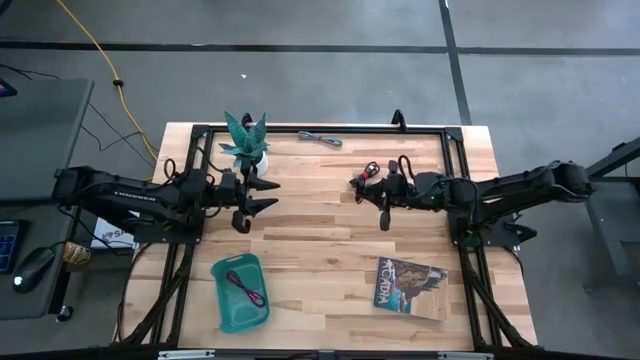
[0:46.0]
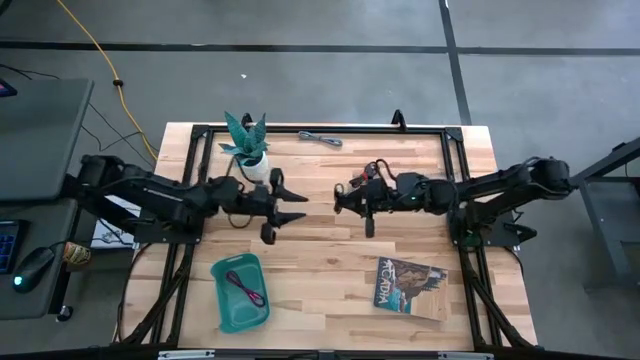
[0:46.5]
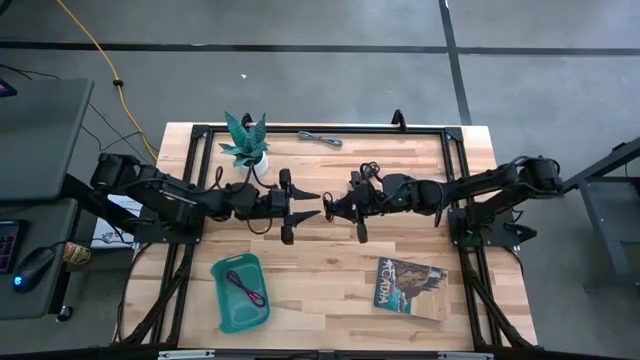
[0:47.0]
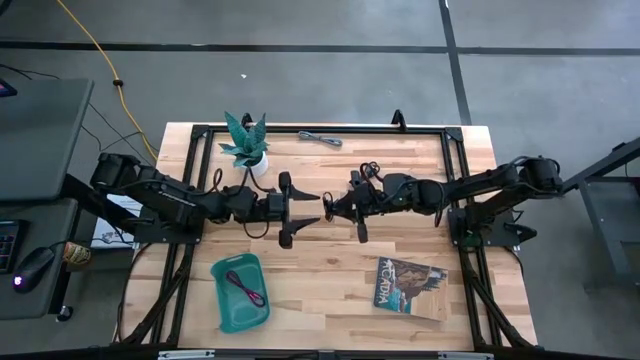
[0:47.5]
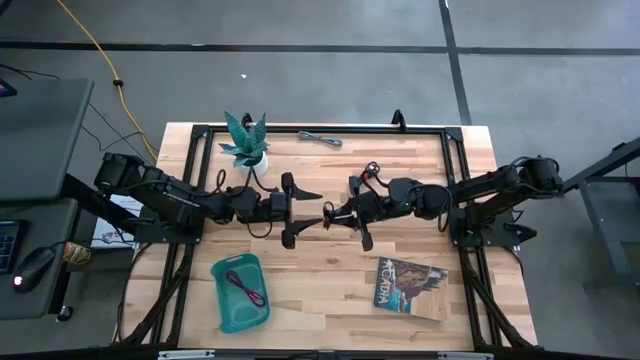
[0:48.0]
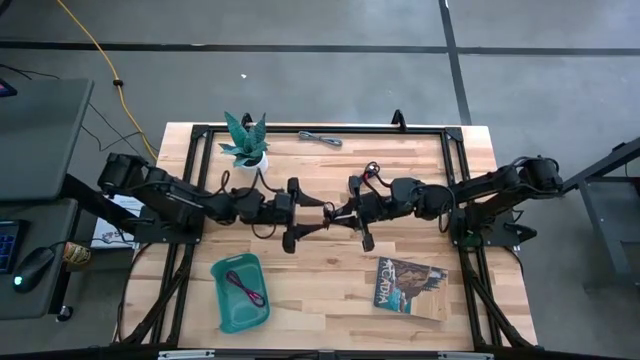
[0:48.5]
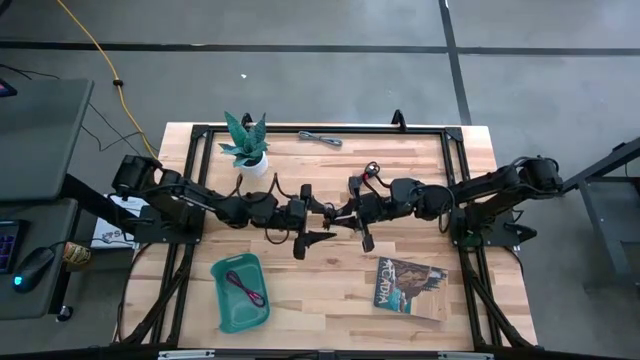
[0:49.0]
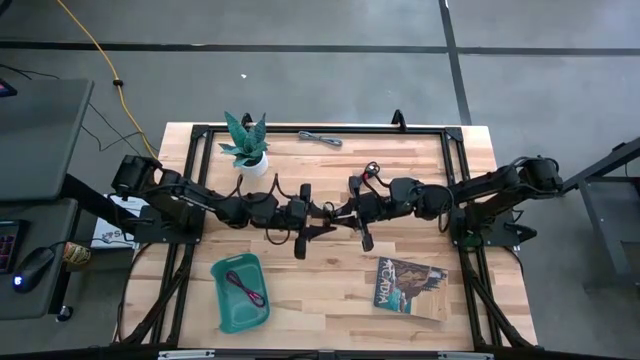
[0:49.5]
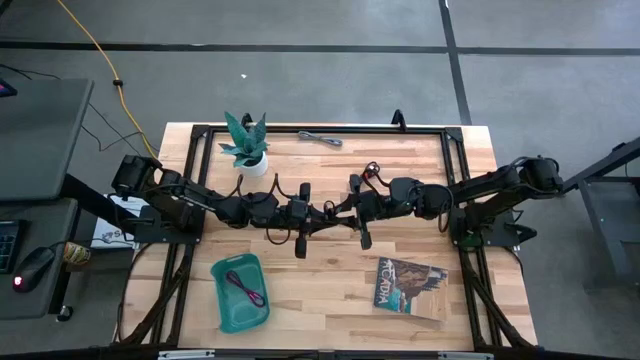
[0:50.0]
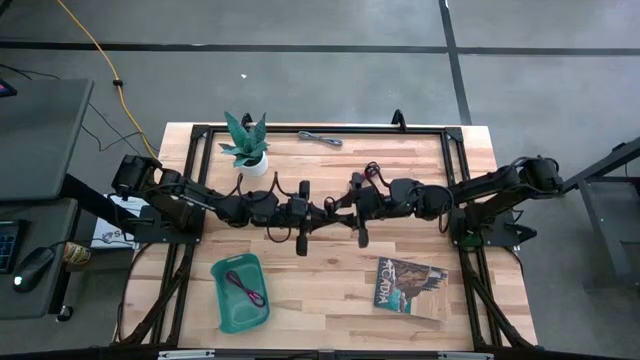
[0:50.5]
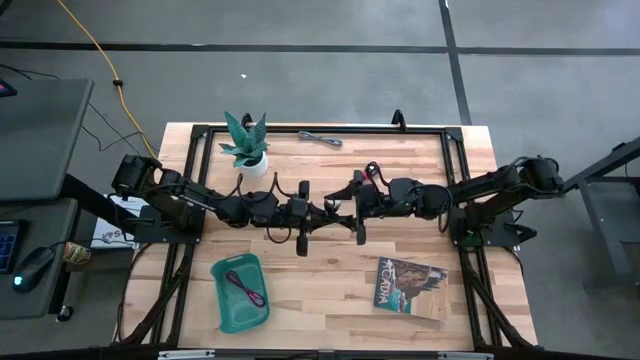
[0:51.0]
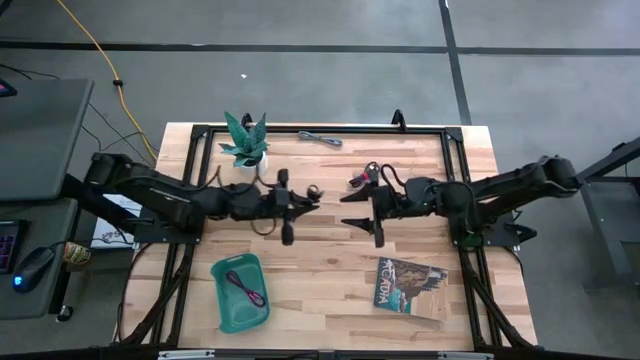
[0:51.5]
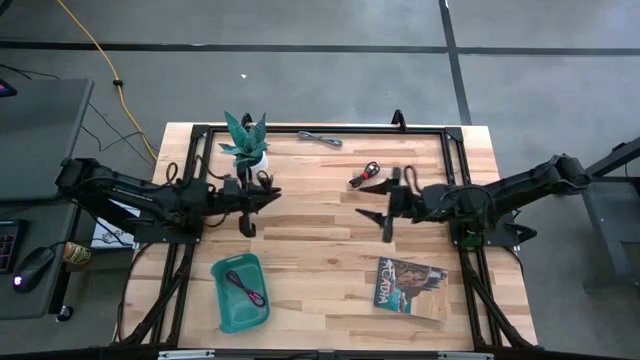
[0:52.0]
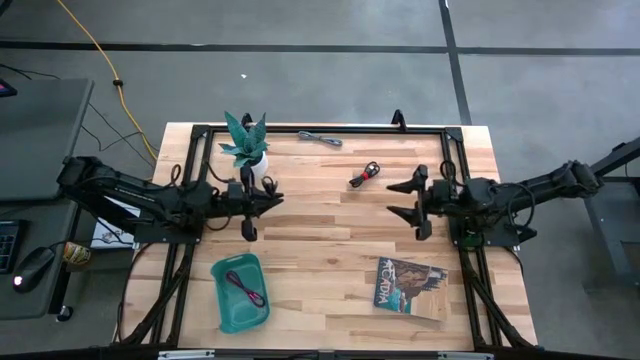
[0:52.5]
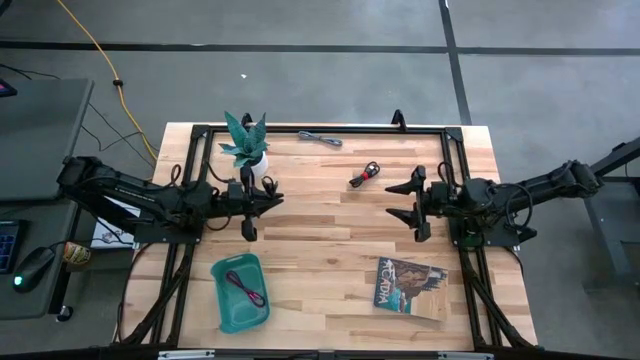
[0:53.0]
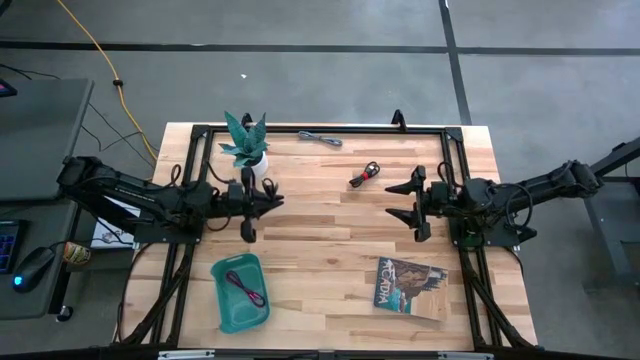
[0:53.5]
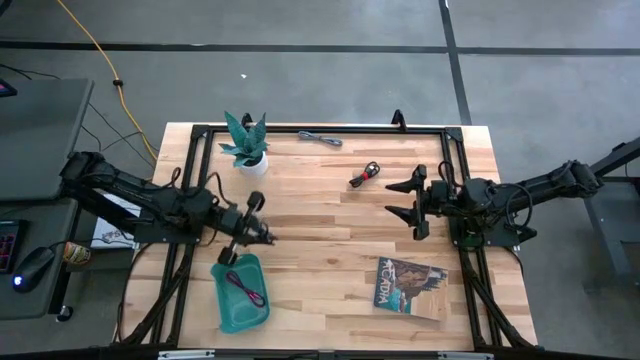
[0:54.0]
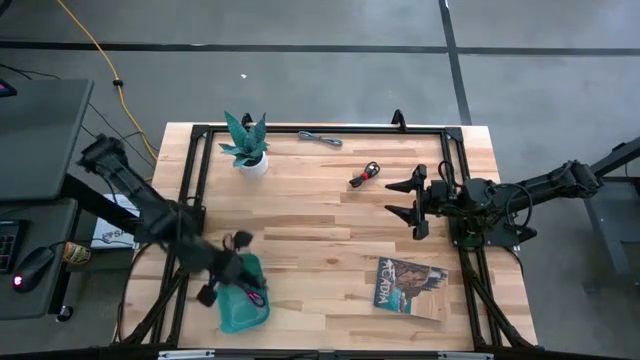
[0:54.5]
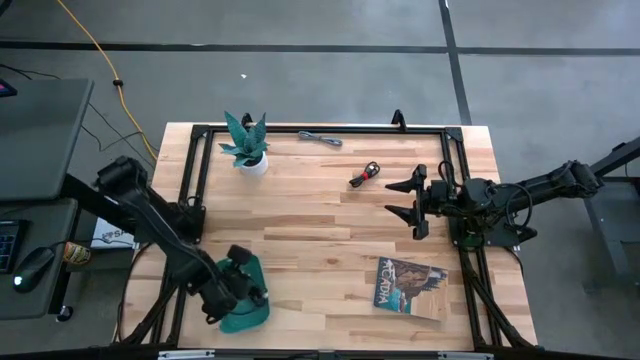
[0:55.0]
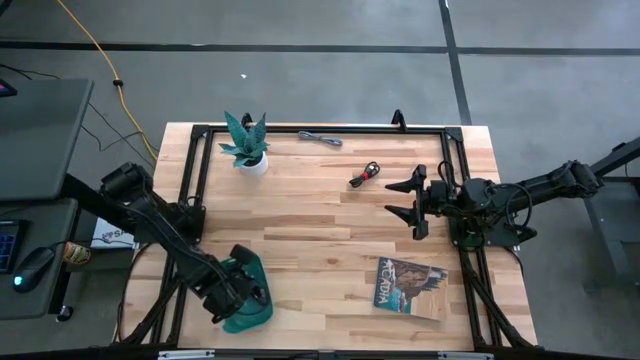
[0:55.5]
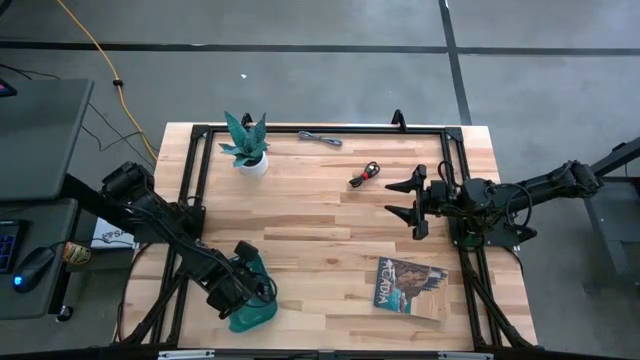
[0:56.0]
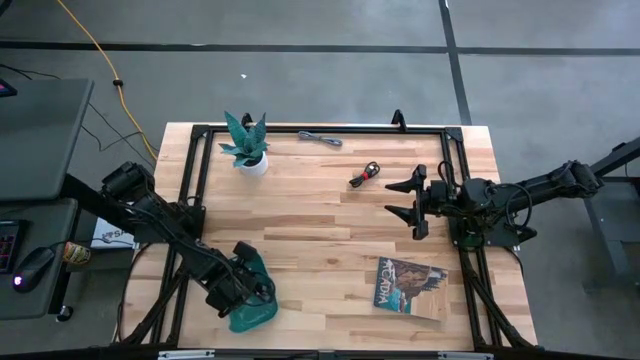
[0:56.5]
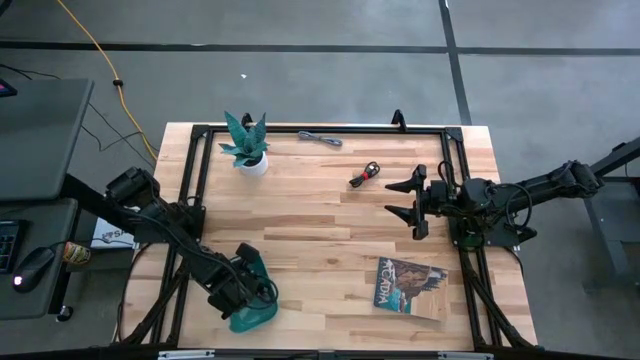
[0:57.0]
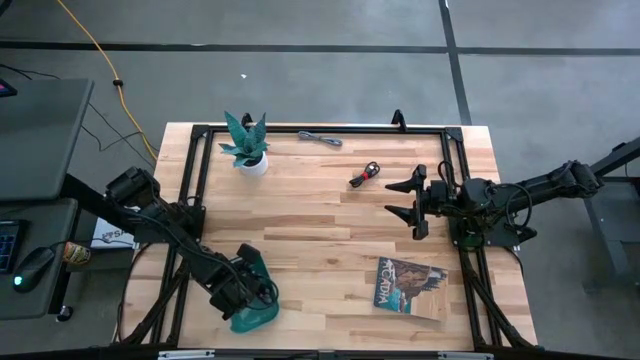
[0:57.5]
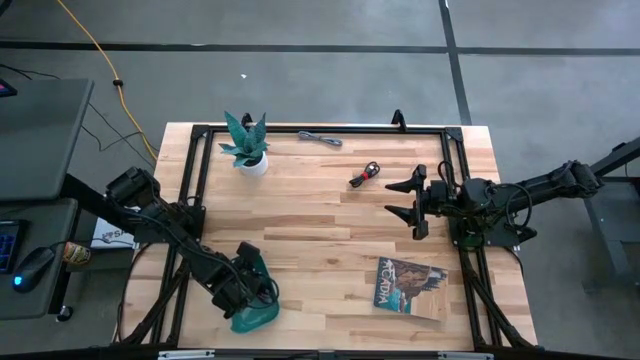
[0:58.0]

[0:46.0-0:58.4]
Task: Pick and place USB-C Cables
Put the right black USB cable into the green bin

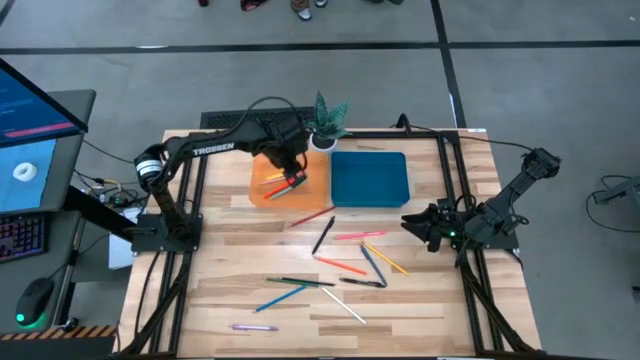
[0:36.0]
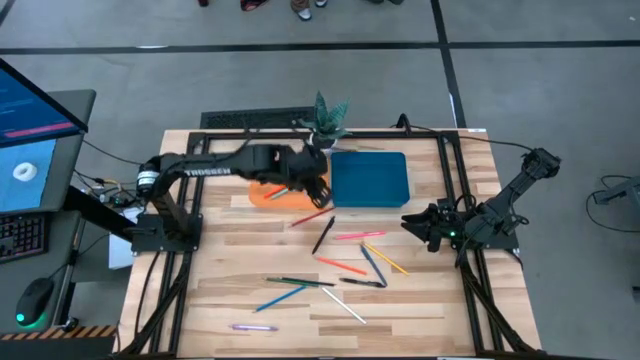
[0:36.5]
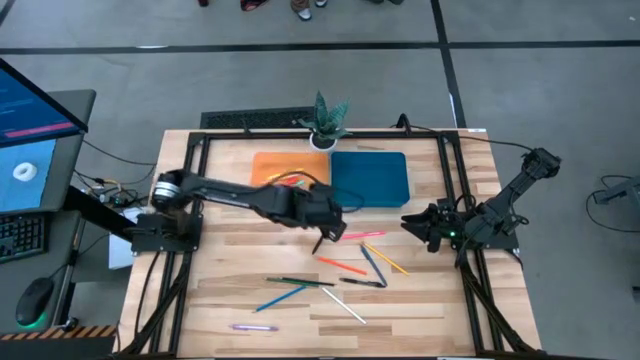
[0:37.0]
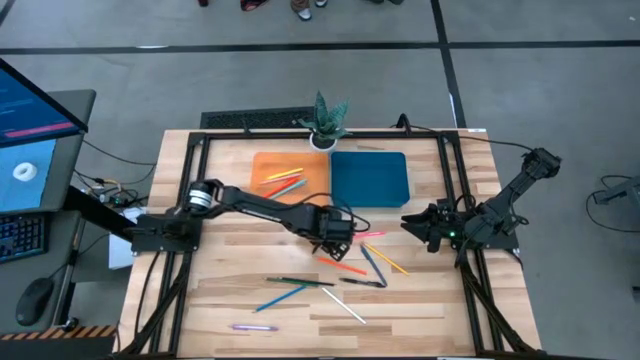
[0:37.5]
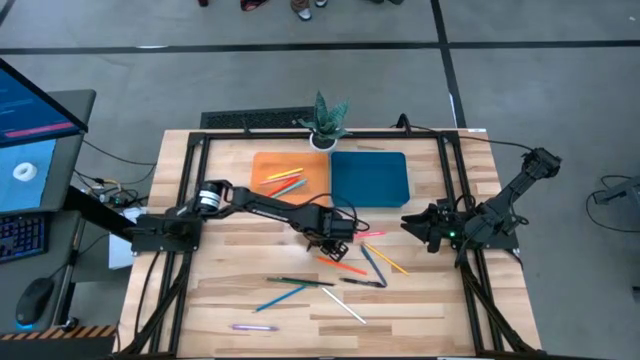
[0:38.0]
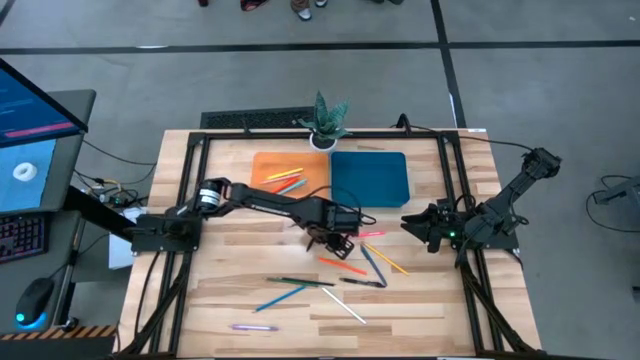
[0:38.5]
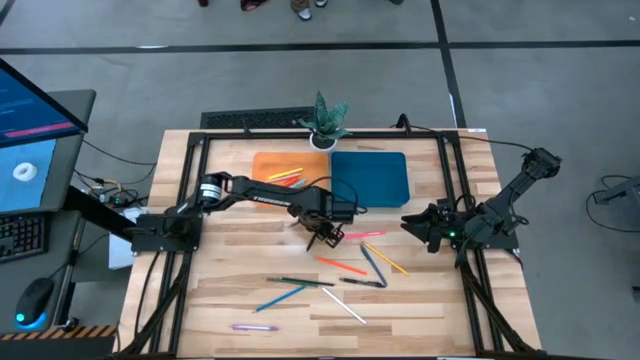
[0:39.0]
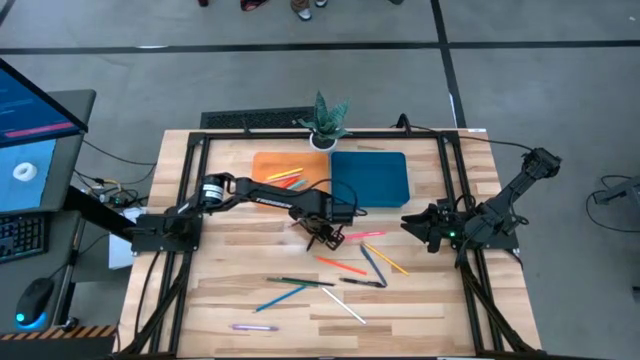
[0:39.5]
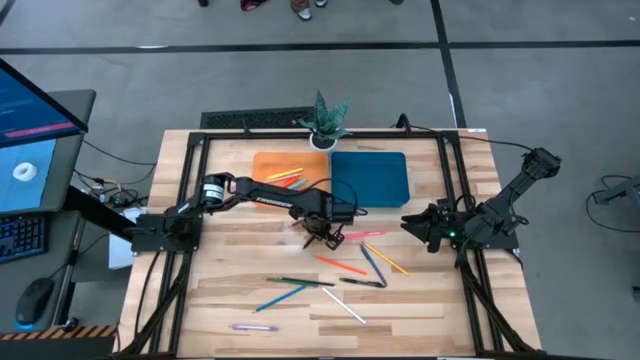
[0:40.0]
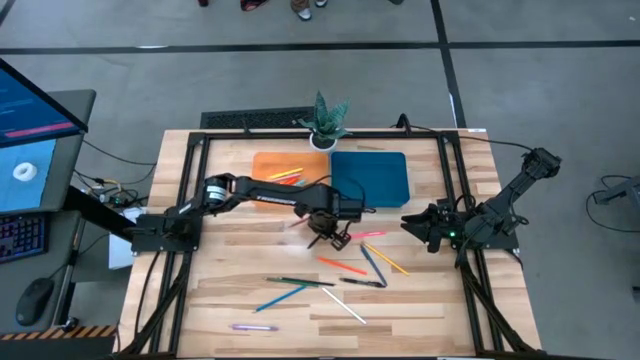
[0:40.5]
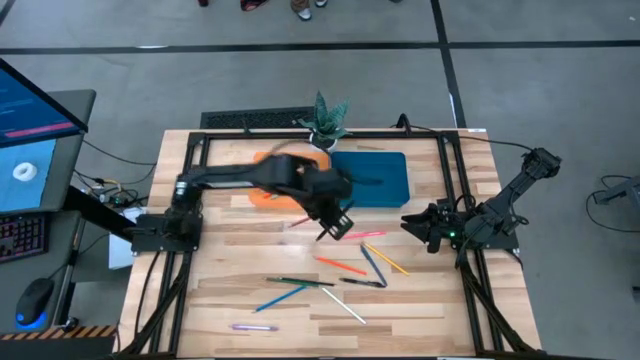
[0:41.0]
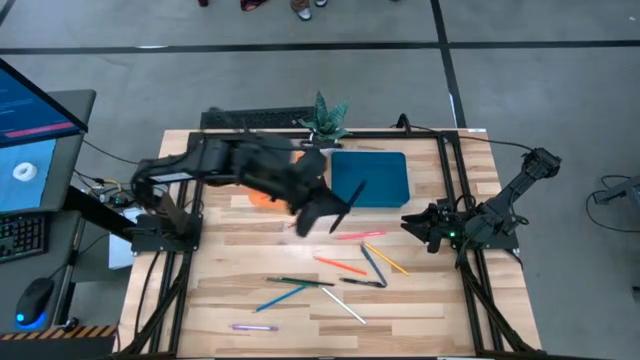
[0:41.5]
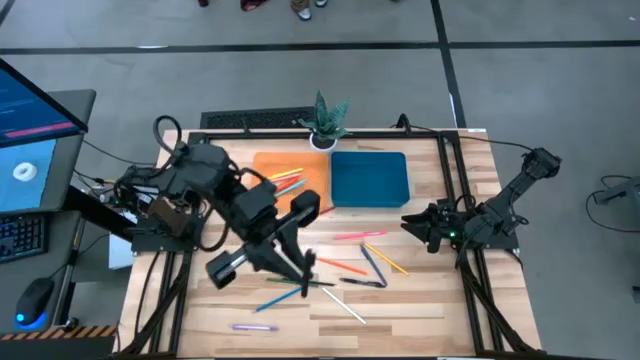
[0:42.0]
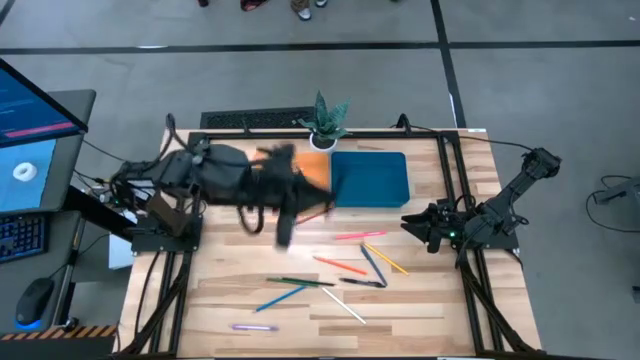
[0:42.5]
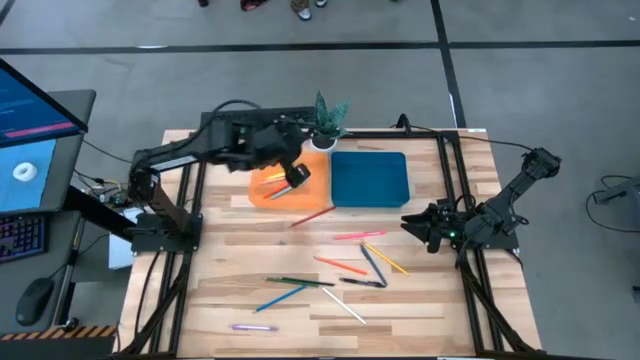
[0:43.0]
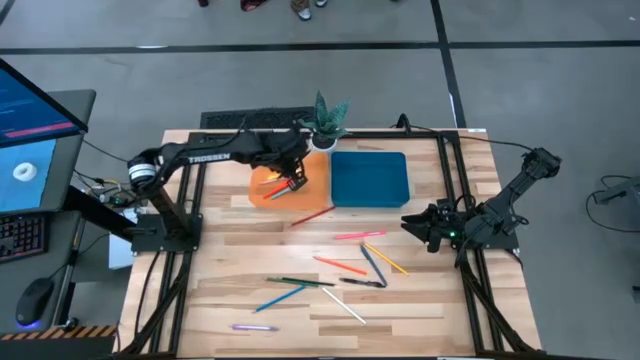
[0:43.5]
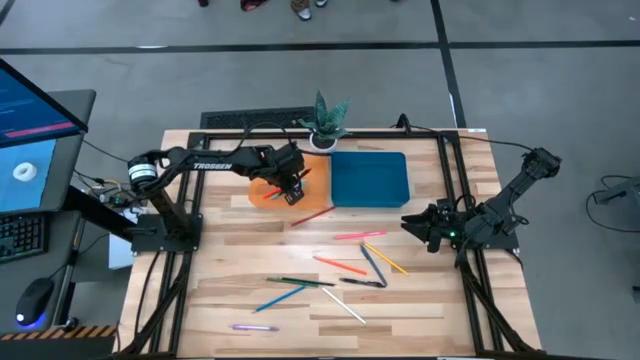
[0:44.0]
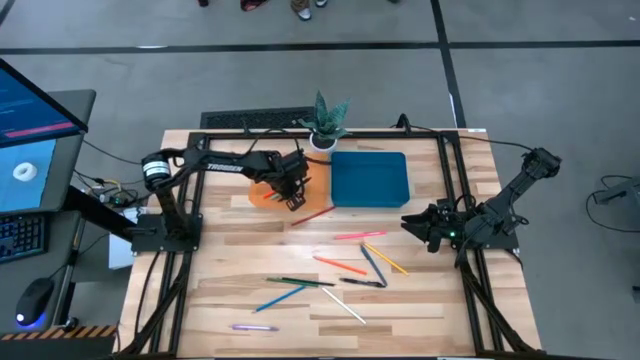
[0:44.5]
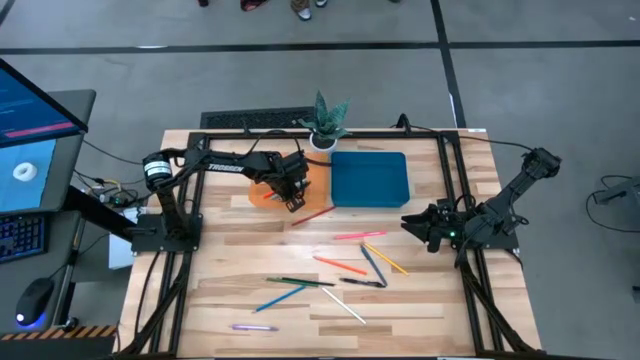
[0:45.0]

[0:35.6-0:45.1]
Task: Sort pens & pencils
Put the top black pen into the orange bin
